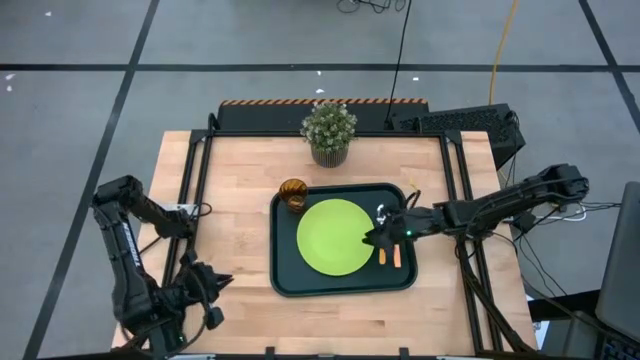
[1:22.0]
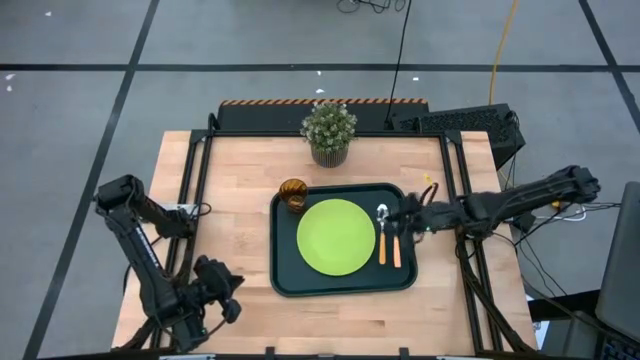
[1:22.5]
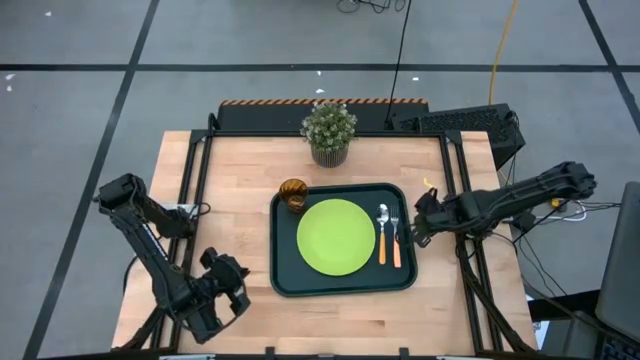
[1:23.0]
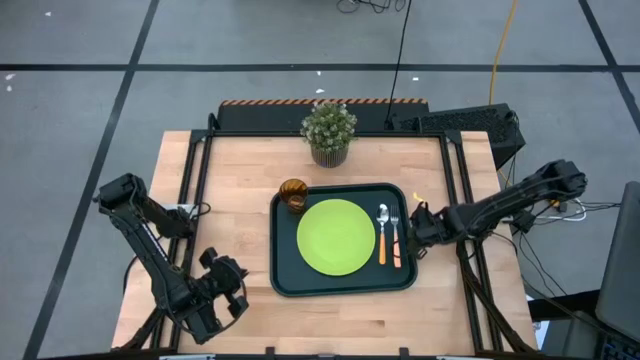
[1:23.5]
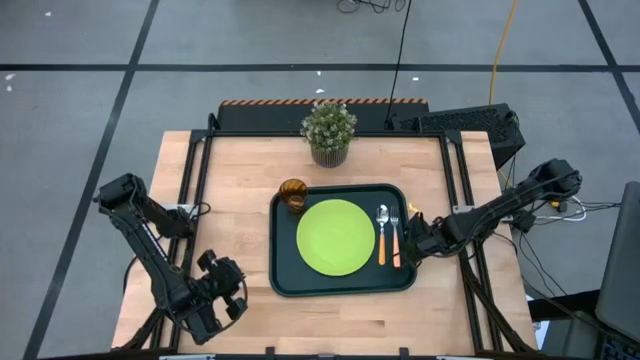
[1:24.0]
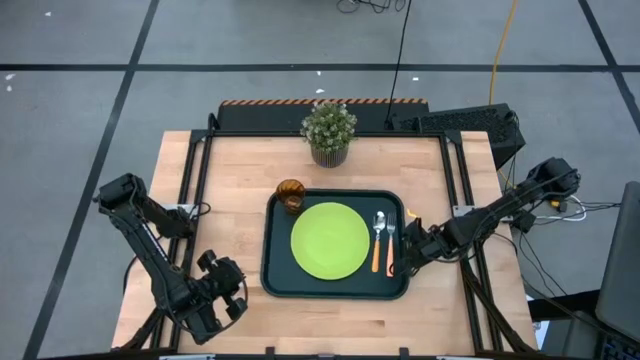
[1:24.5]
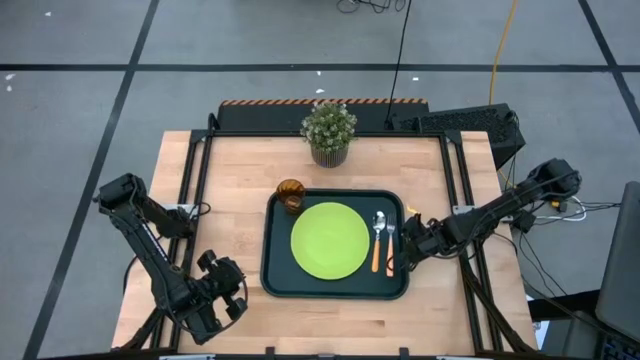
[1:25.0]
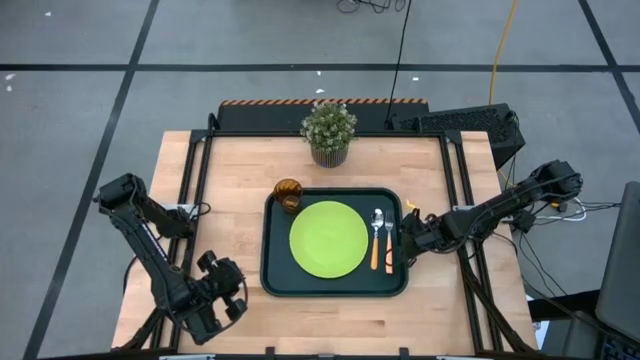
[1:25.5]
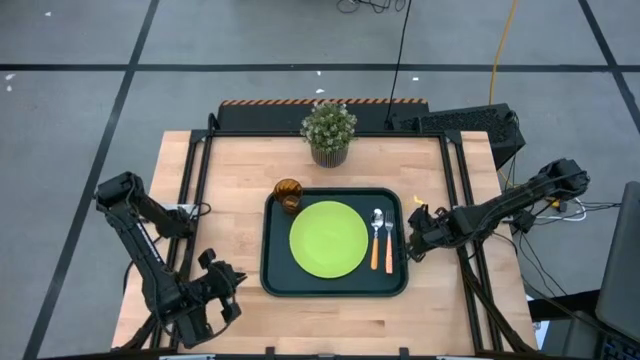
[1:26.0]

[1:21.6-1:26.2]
Task: Pick and place plate/cup/fork/spoon on tray
Adjust the serving tray

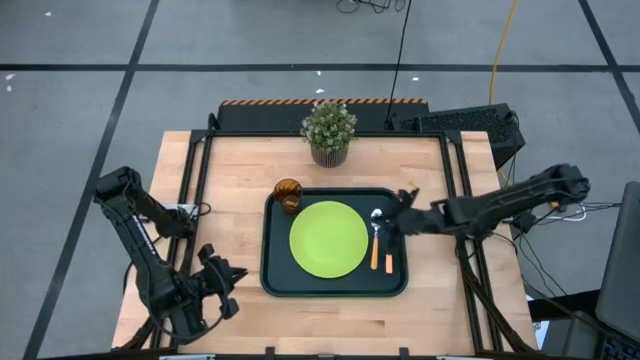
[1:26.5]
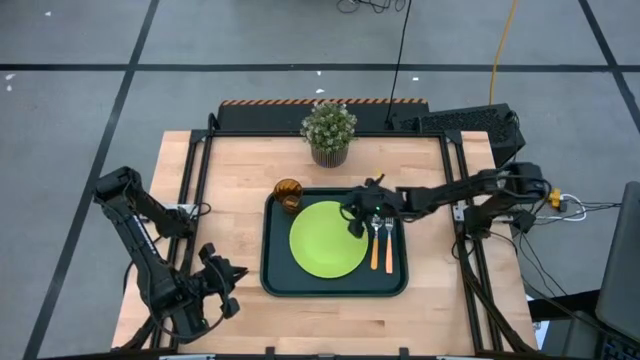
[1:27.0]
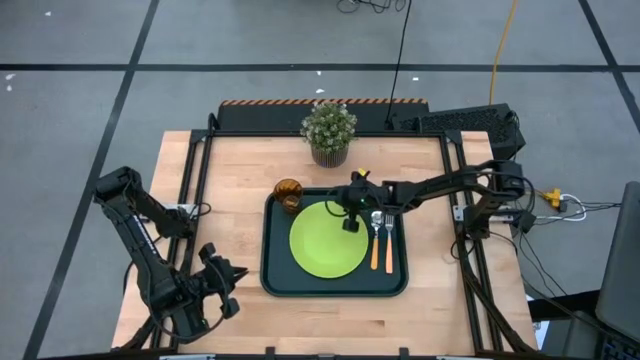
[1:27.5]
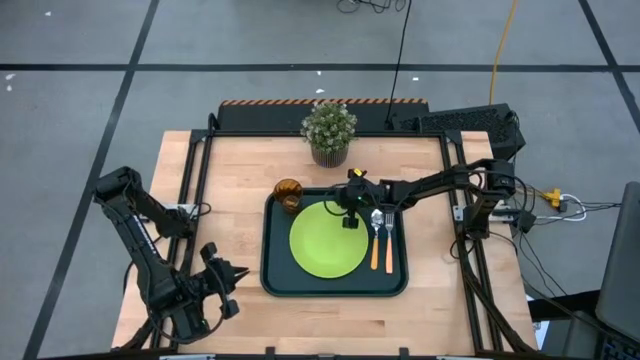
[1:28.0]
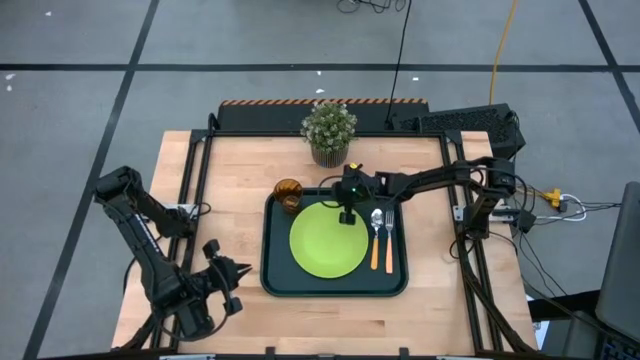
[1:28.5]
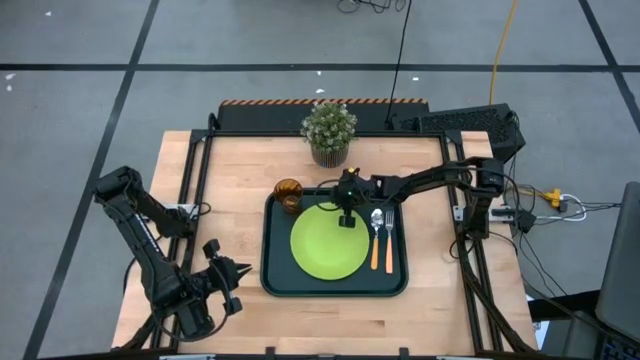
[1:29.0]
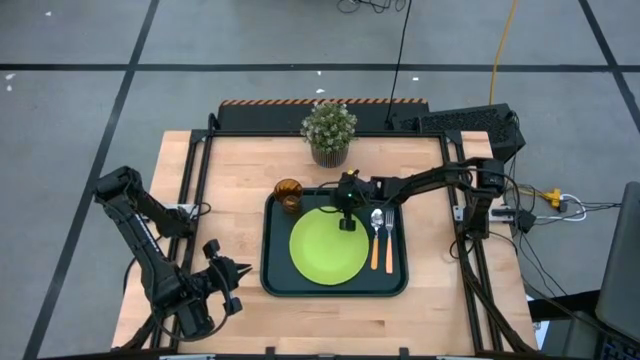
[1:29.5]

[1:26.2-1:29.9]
Adjust the plate on the serving tray

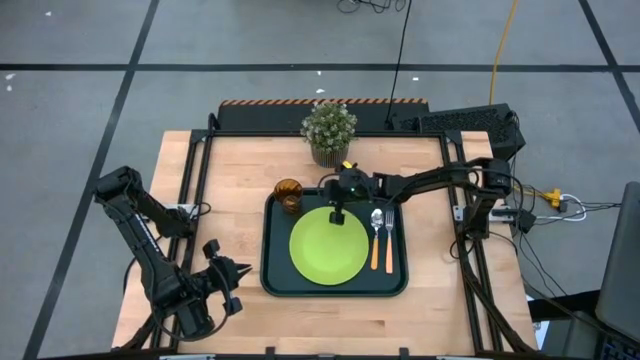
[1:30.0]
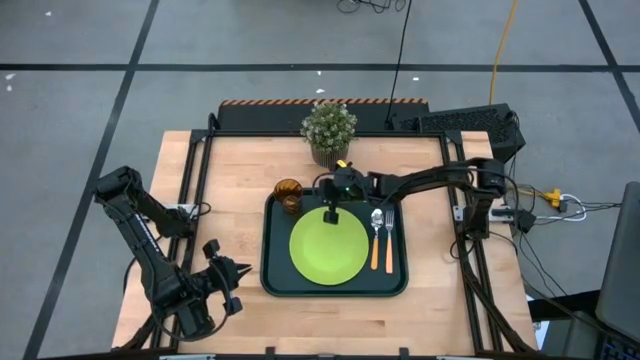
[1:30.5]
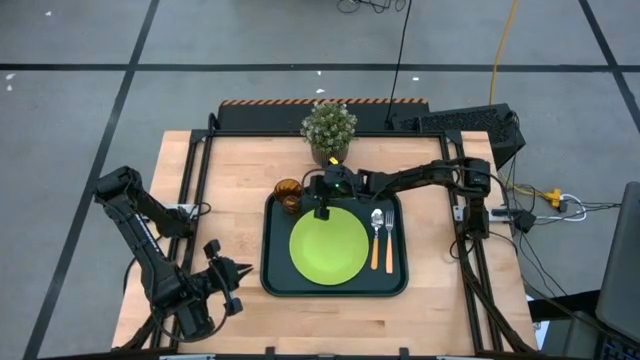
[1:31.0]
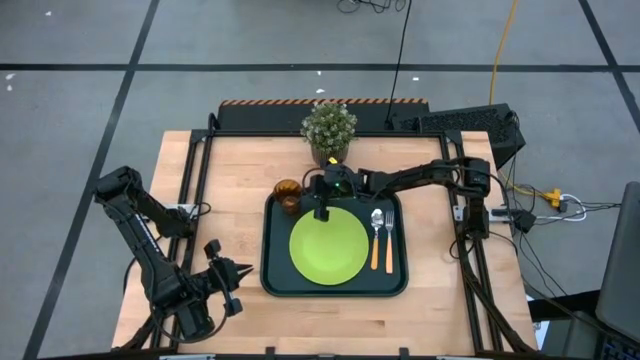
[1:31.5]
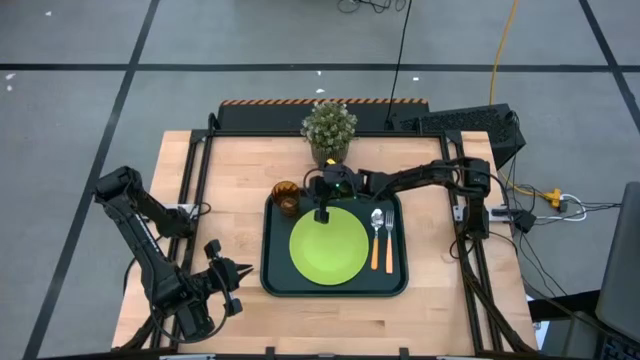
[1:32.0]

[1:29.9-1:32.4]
Adjust the cup on the serving tray

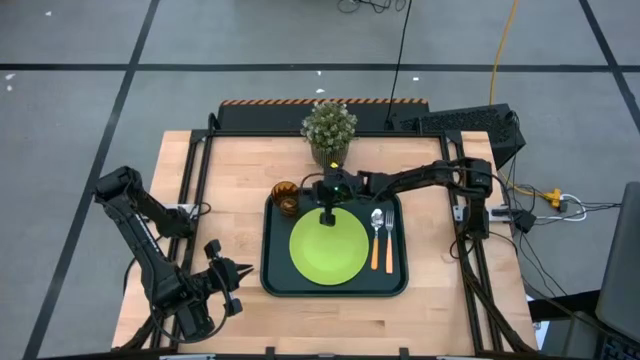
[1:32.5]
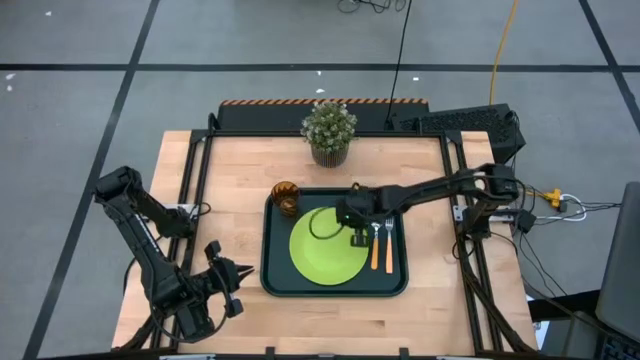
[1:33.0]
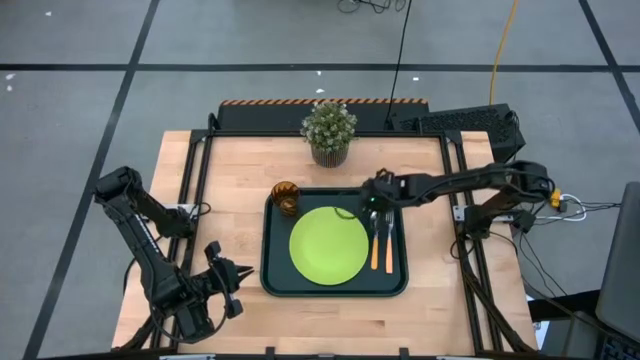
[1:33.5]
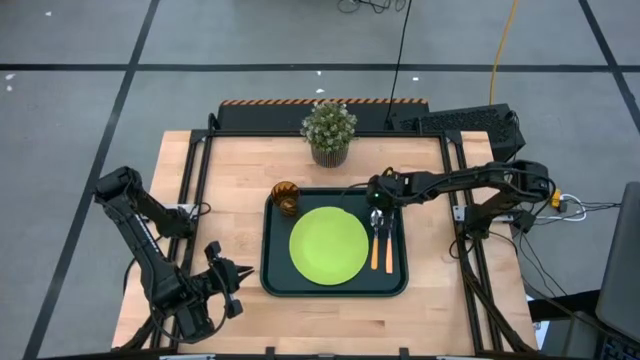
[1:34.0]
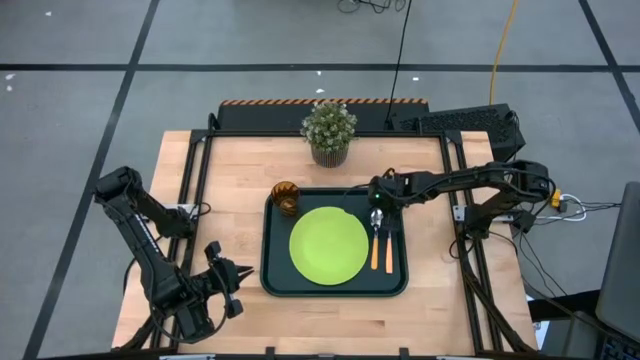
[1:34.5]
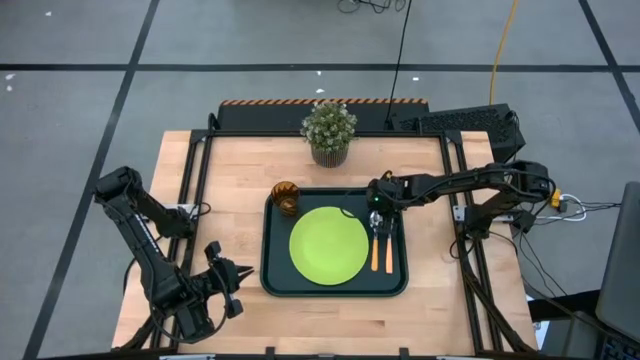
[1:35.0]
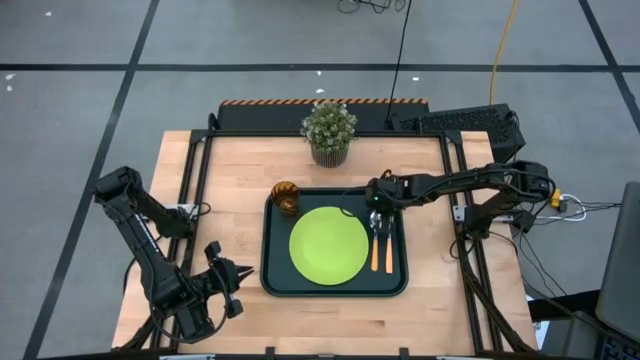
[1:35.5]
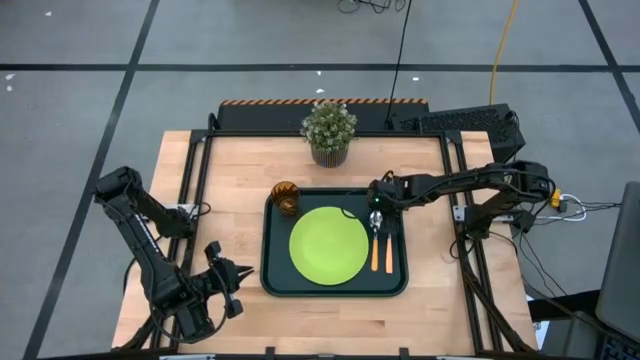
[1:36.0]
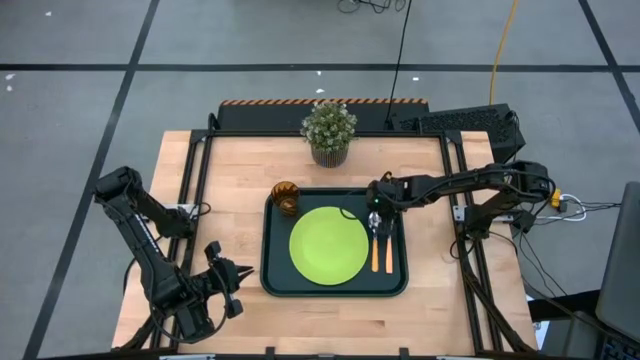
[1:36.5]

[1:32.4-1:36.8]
Adjust the spoon on the serving tray

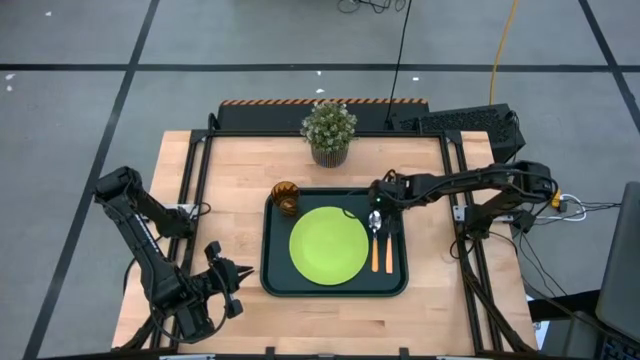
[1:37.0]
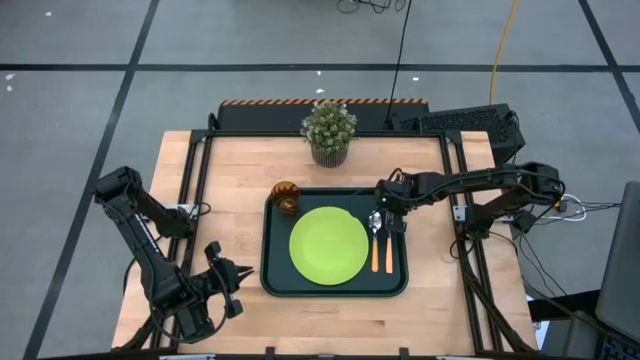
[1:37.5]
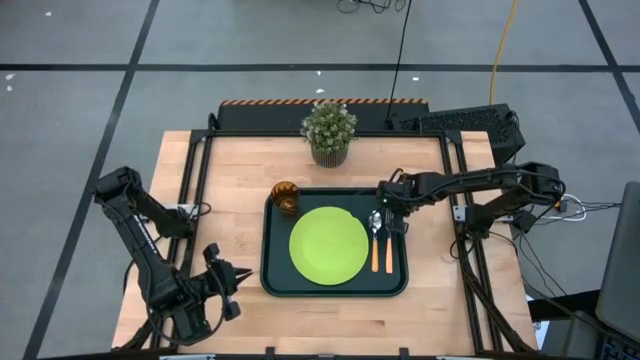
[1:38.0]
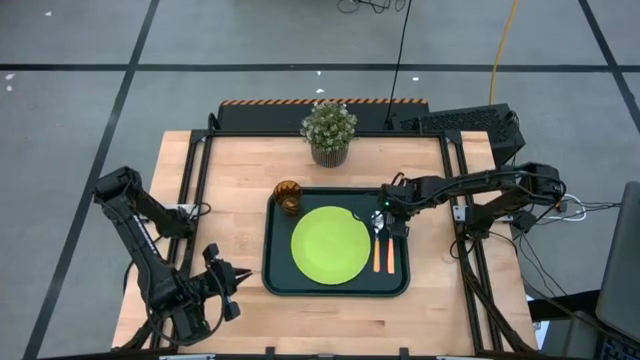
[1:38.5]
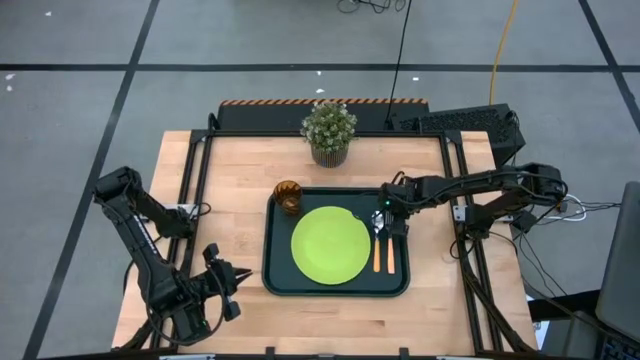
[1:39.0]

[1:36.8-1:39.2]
Adjust the fork on the serving tray

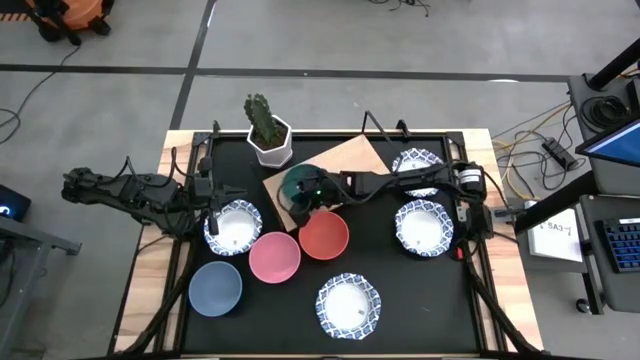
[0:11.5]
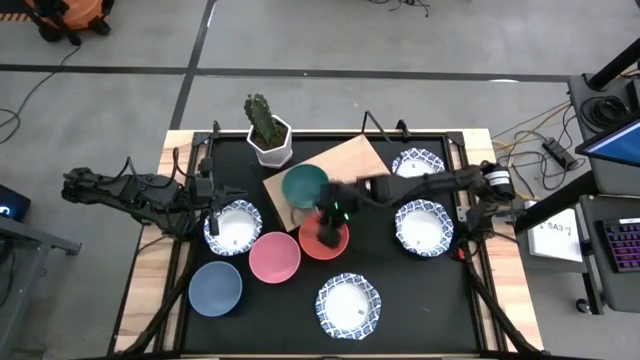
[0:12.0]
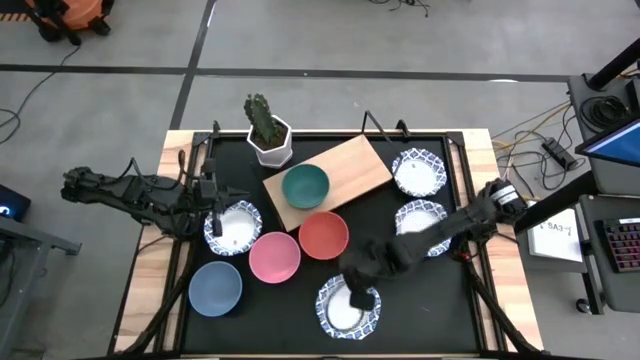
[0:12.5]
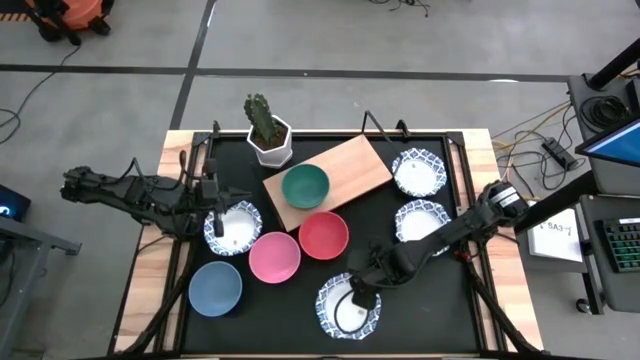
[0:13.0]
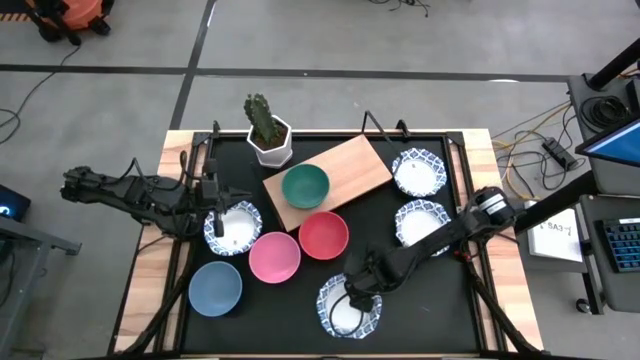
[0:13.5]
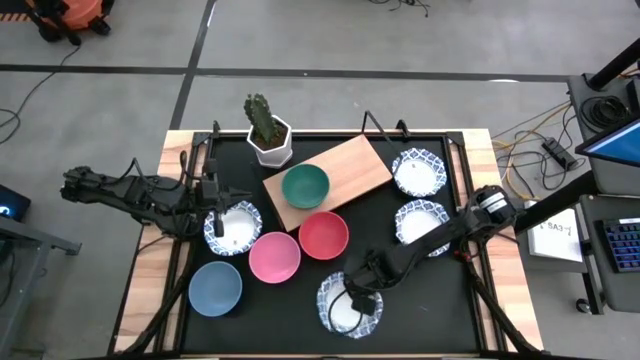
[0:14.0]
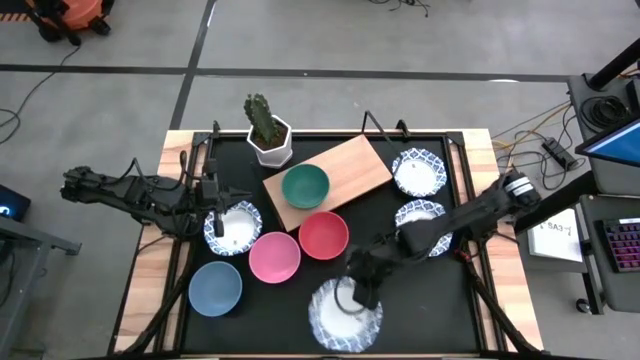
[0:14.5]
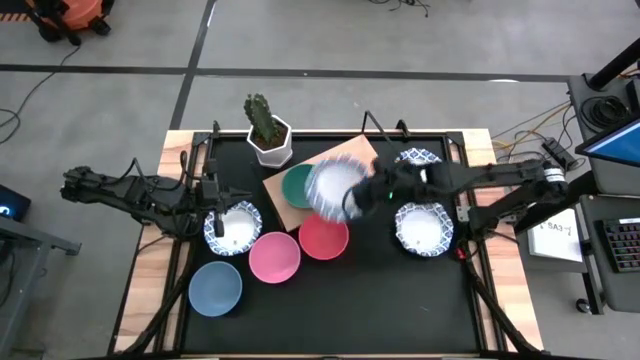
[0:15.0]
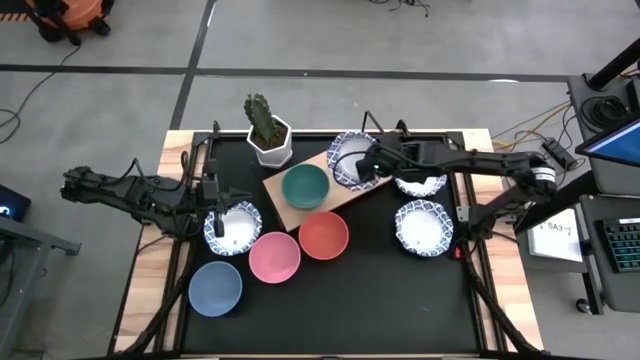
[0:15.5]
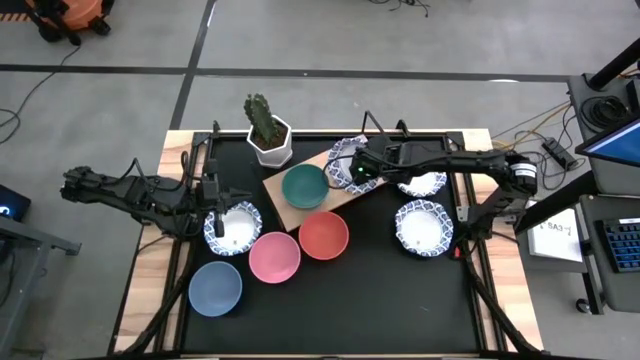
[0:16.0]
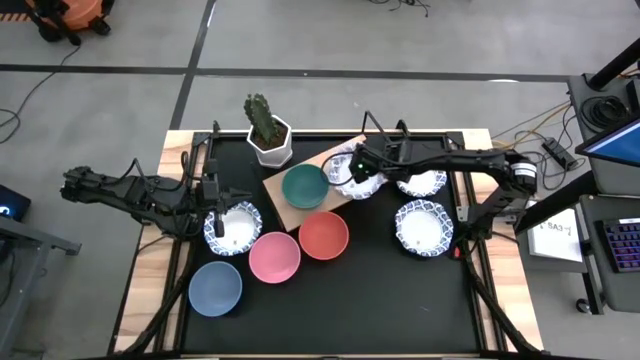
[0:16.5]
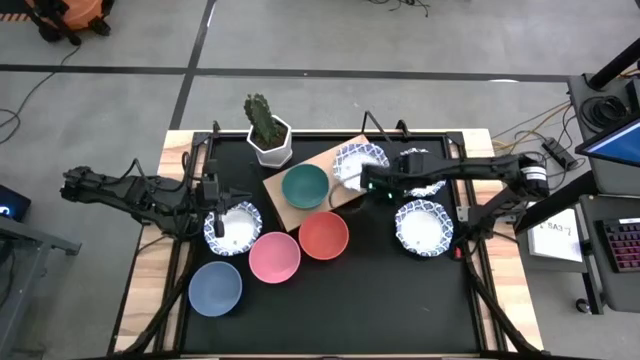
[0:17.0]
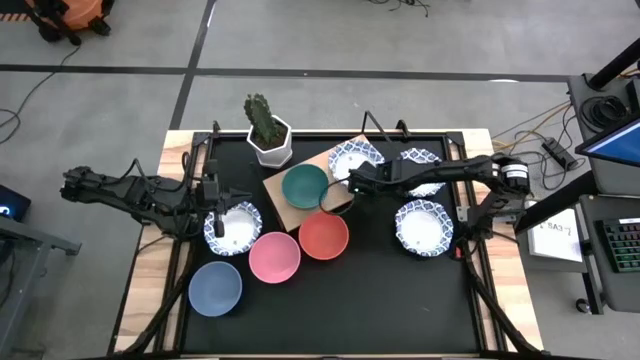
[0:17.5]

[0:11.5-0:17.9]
Task: Place and stack bowls onto a shelf
Put the white bowl on the shelf
